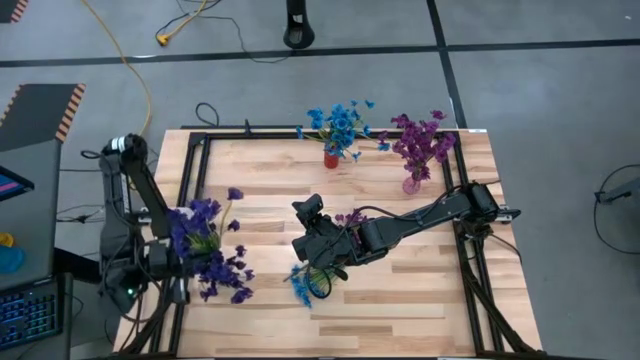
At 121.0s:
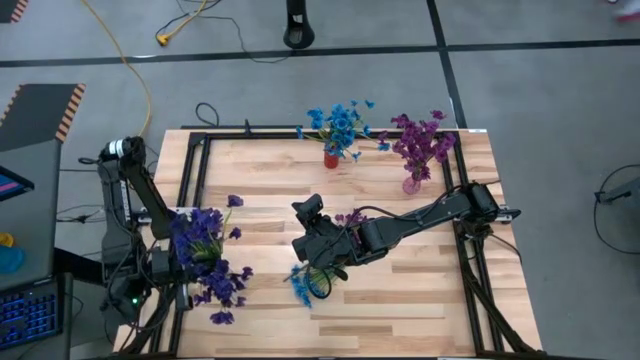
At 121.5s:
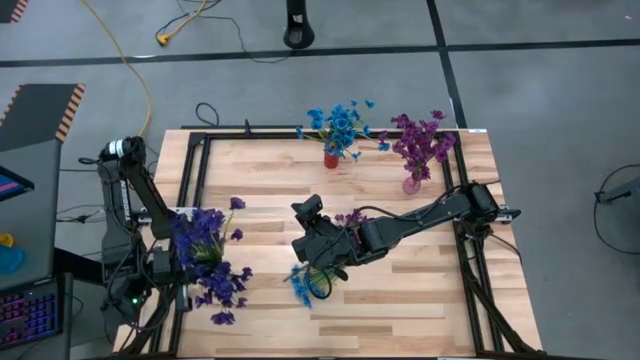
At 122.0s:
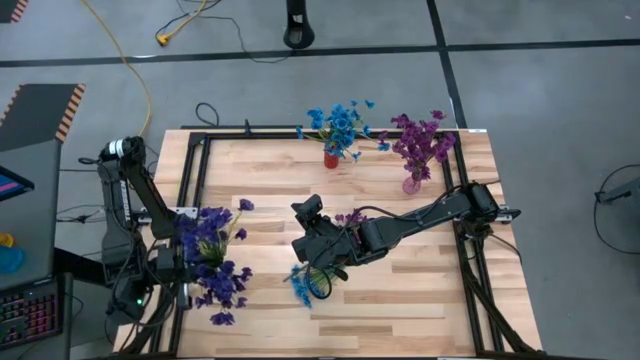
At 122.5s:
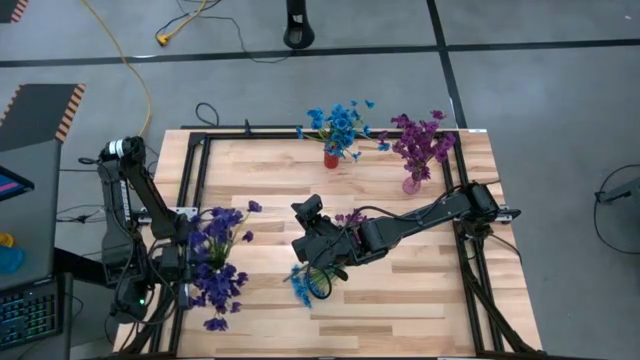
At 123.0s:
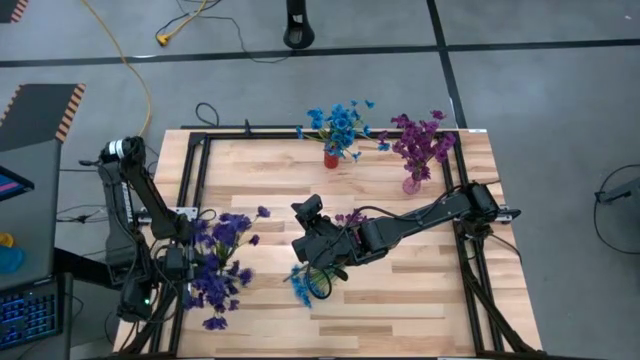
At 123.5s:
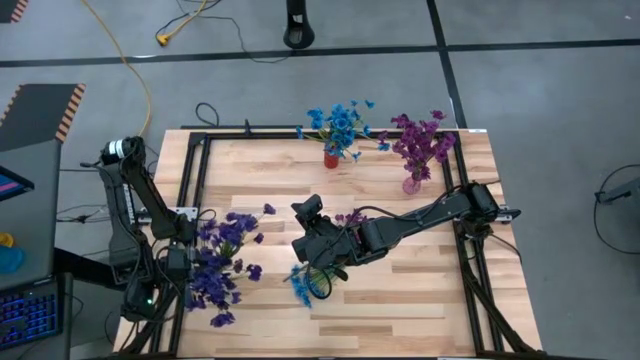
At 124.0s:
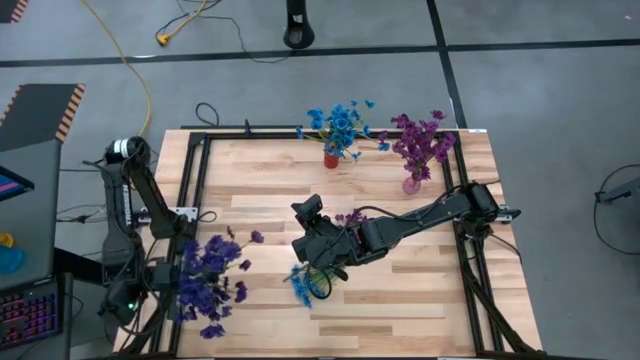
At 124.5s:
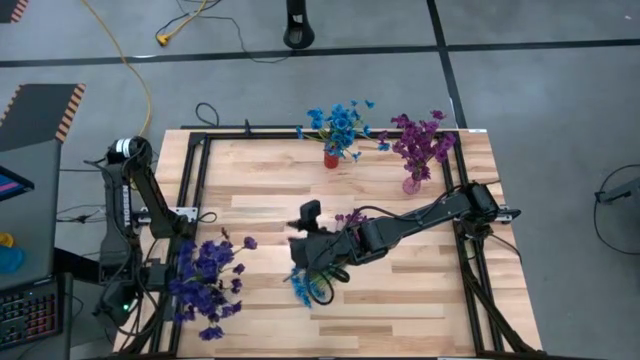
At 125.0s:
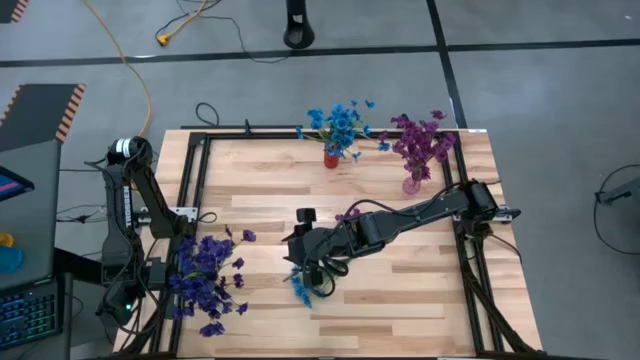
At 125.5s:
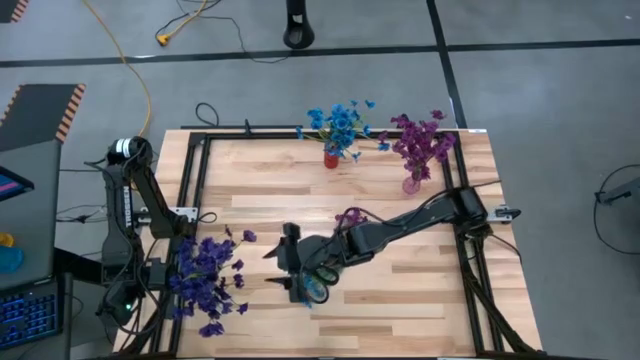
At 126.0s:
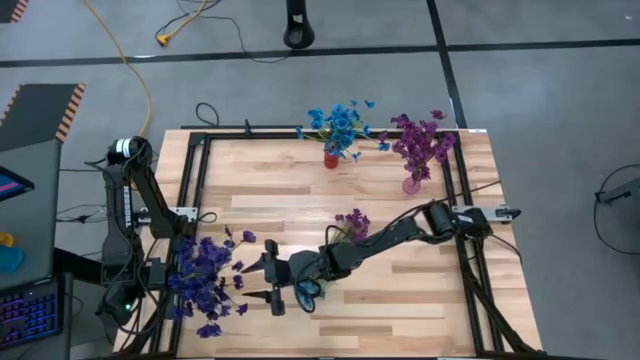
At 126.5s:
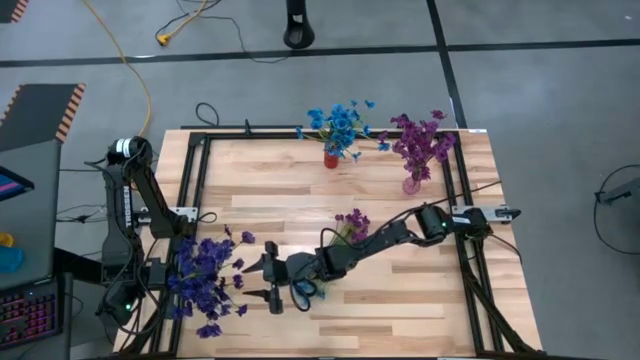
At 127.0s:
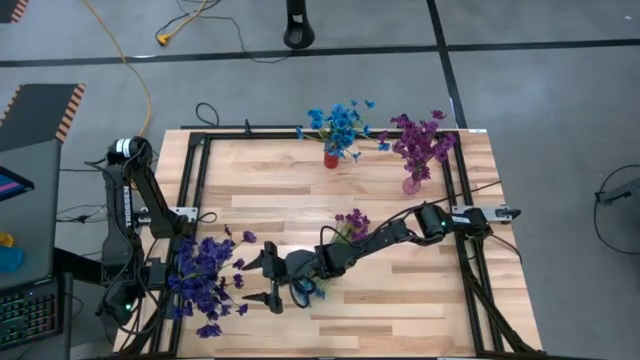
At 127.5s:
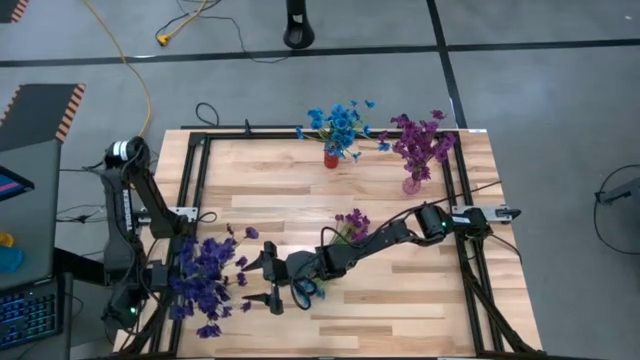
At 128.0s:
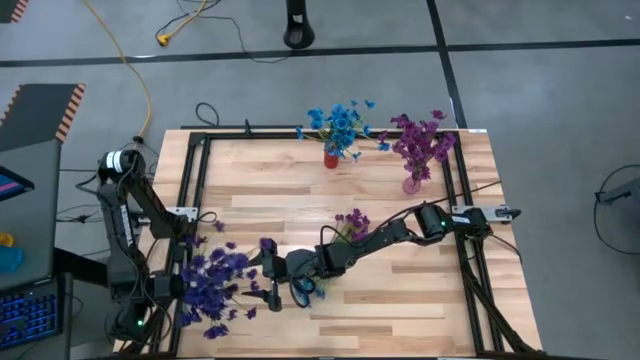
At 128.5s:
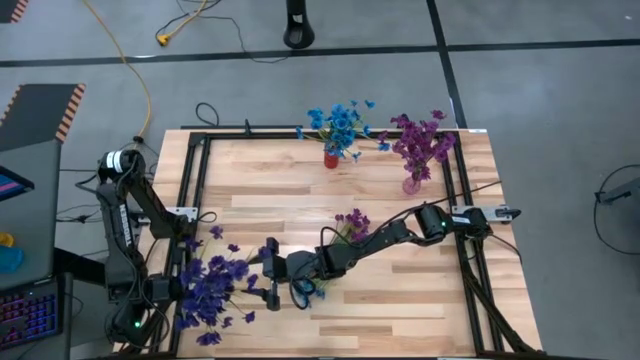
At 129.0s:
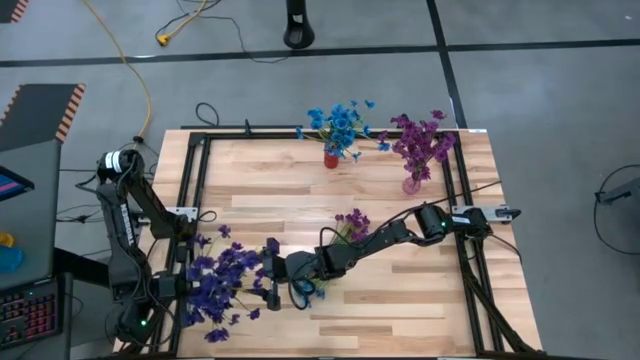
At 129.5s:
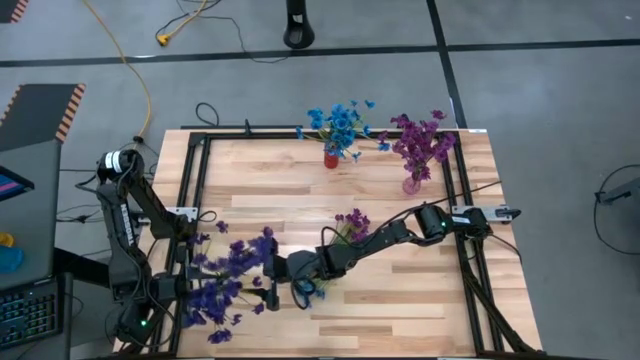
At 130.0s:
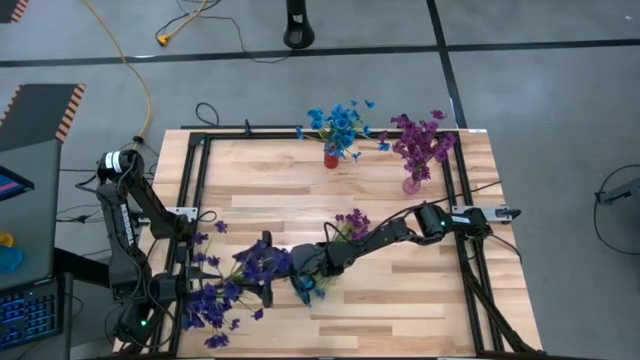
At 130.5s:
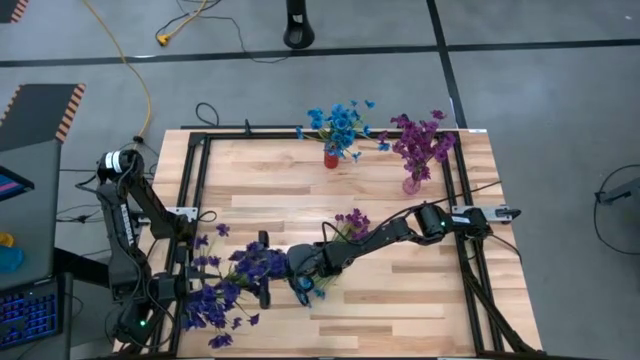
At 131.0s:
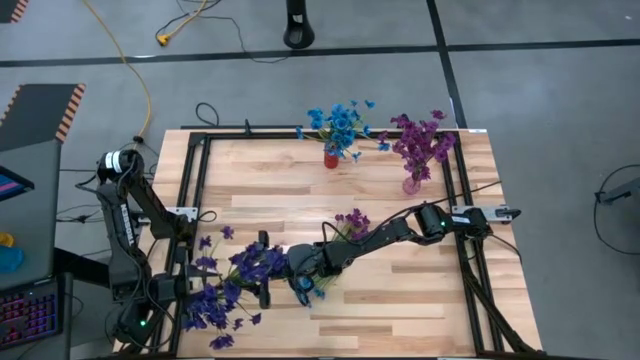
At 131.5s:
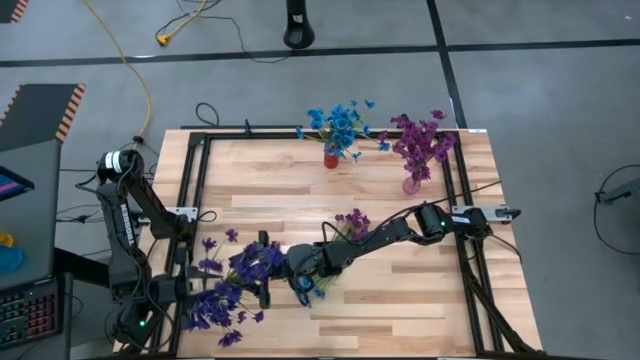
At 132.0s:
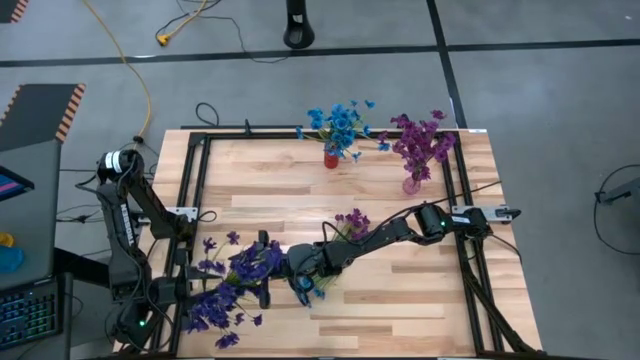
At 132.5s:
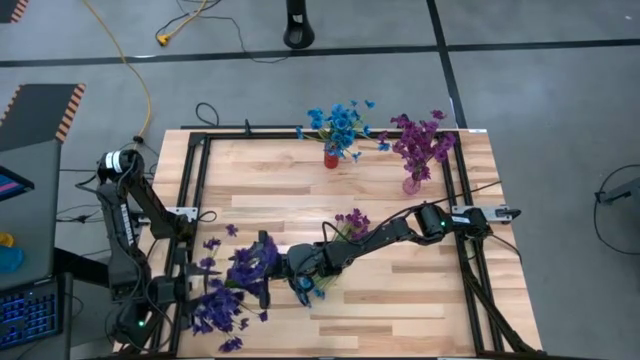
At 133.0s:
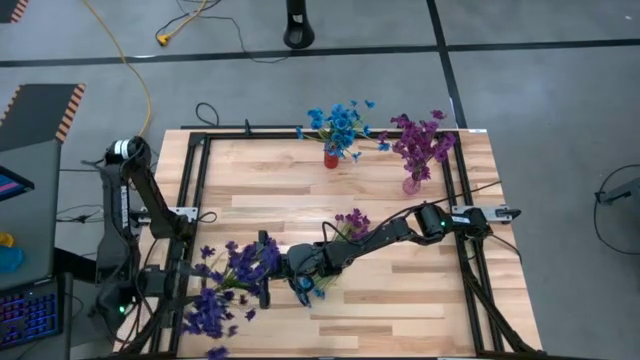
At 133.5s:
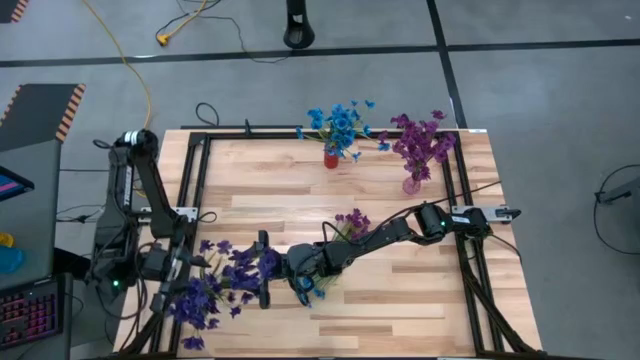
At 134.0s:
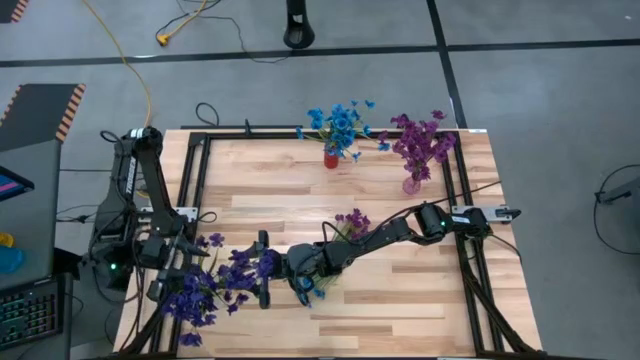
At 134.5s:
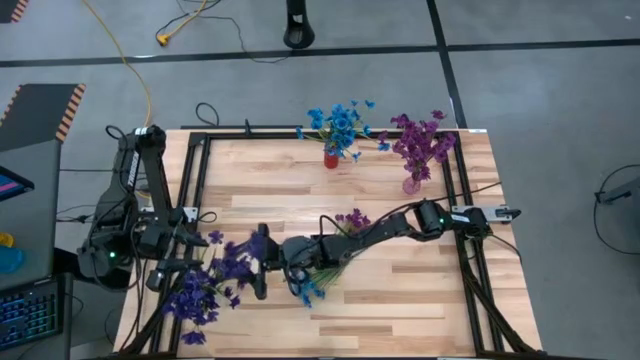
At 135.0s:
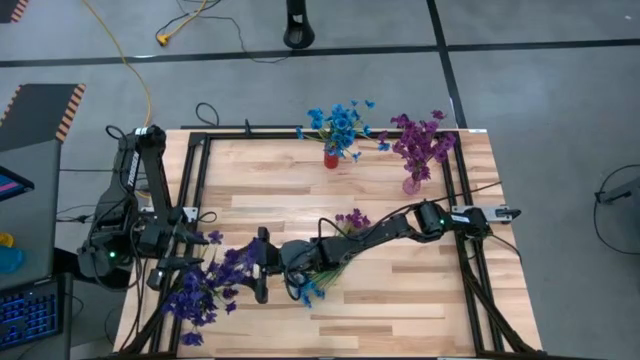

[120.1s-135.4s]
Task: Sort flowers into vase by color
Put the dark blue flowers into the transparent vase

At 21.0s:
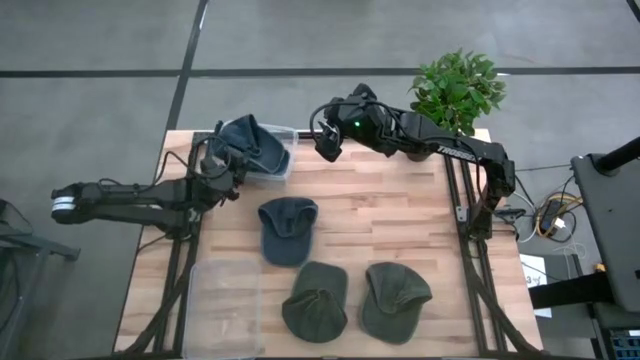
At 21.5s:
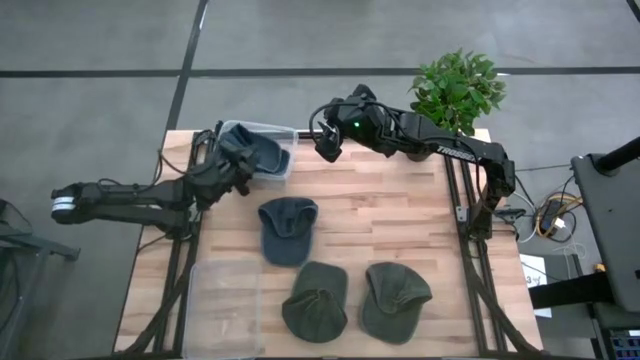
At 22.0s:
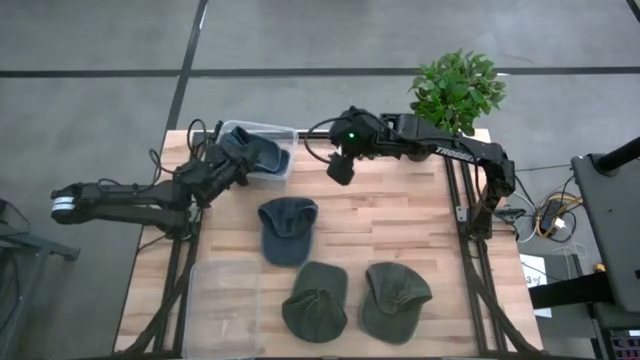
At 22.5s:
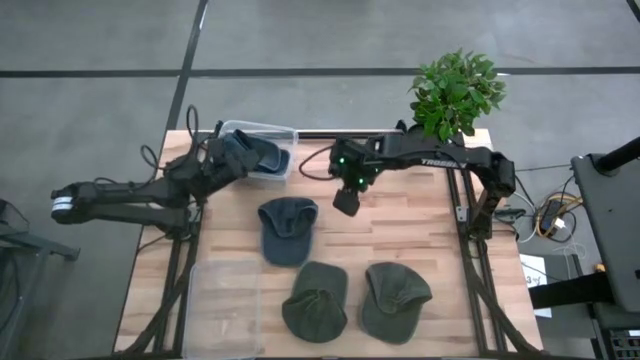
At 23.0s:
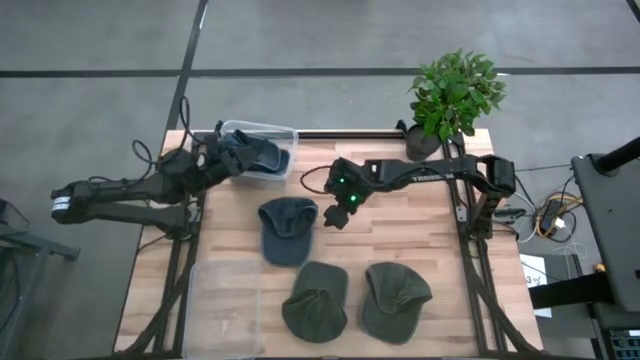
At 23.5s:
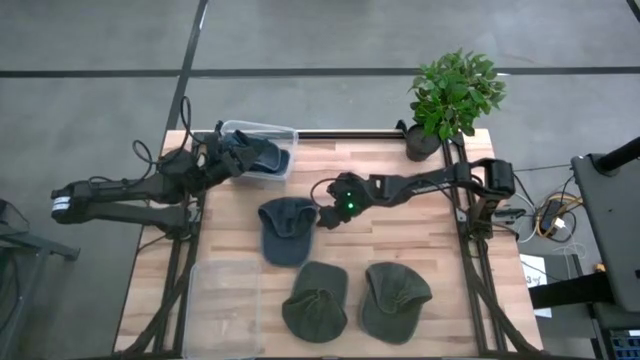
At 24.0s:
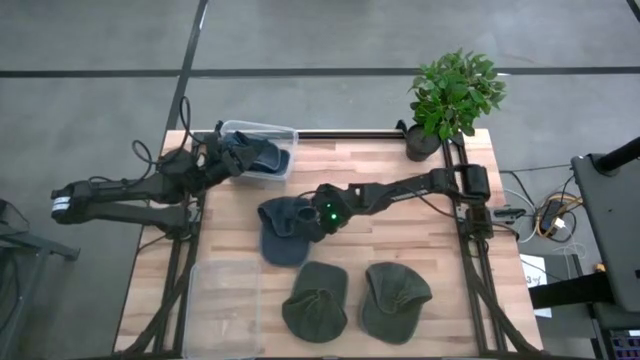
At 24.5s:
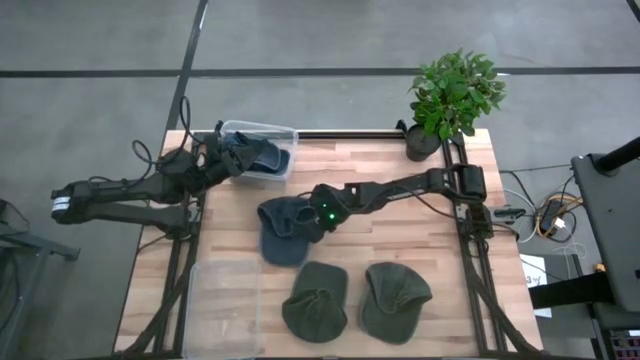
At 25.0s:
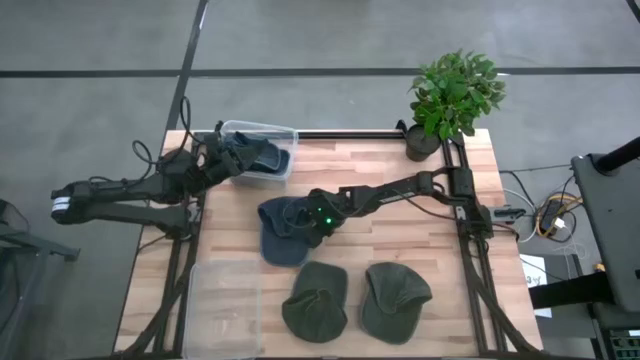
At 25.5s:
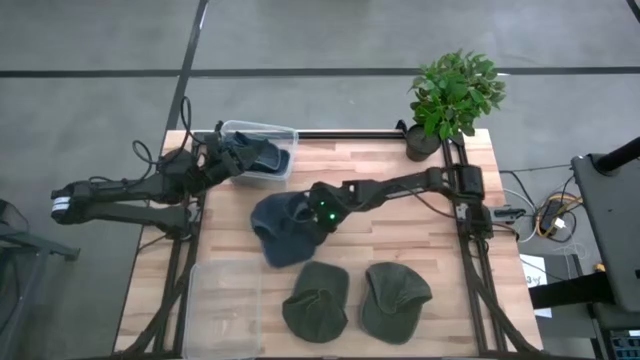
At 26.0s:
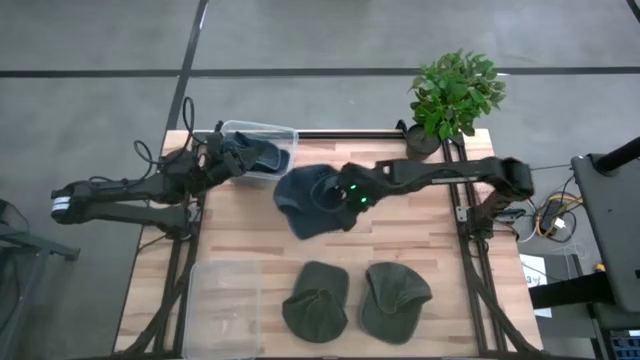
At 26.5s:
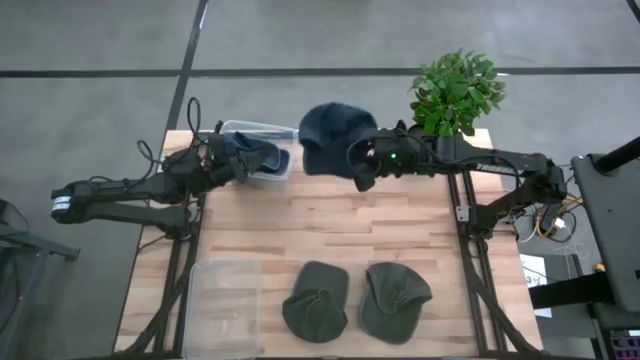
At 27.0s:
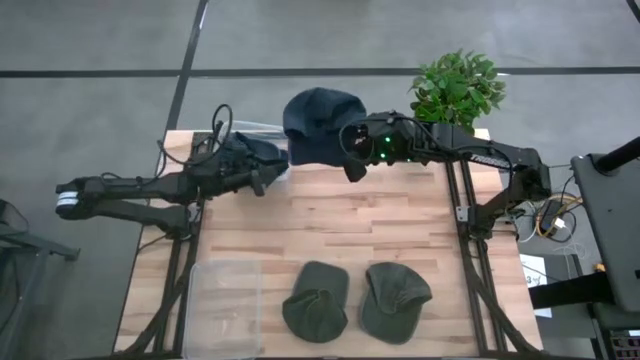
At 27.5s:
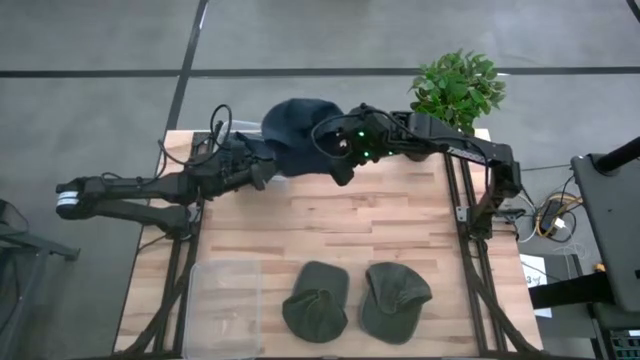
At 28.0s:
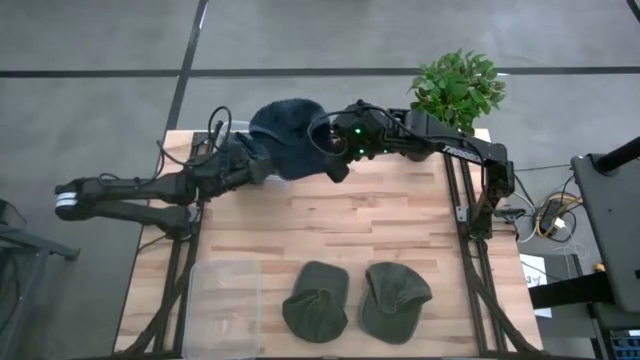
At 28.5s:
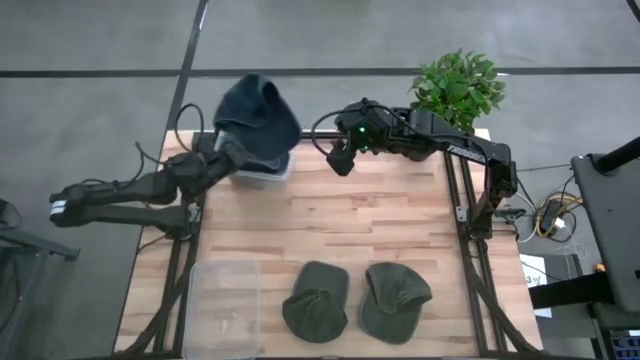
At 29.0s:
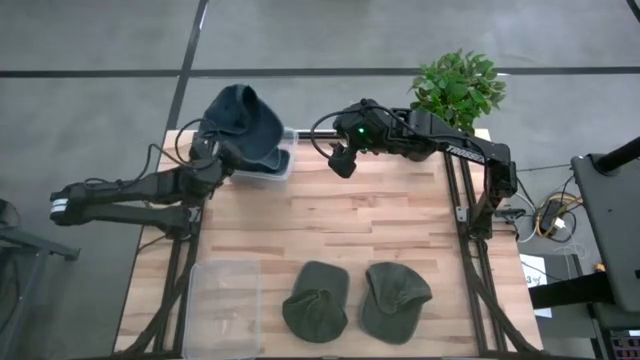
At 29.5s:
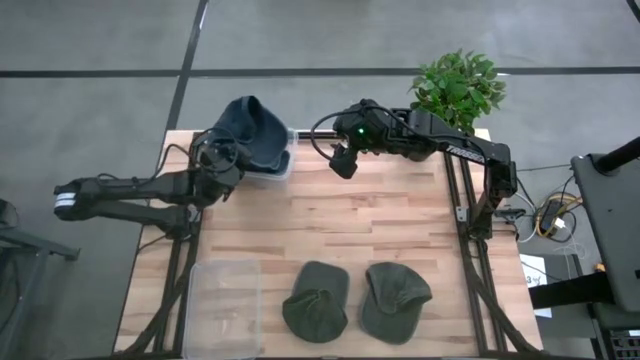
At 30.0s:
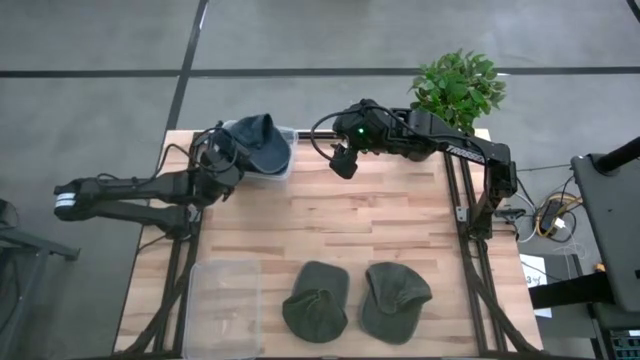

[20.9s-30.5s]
Task: Pick & Place hat
Put the blue cap into the top transparent bin
